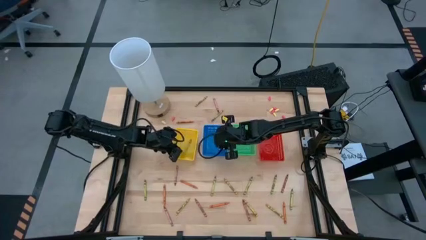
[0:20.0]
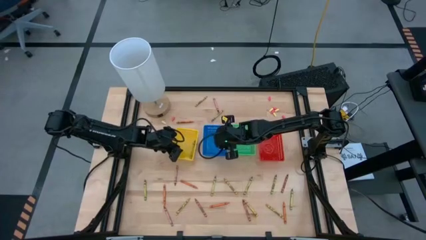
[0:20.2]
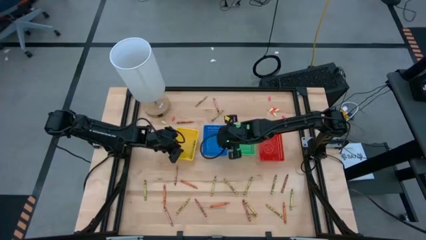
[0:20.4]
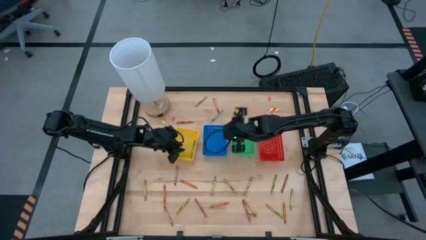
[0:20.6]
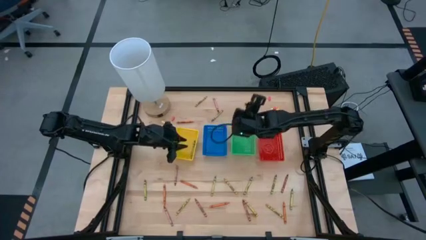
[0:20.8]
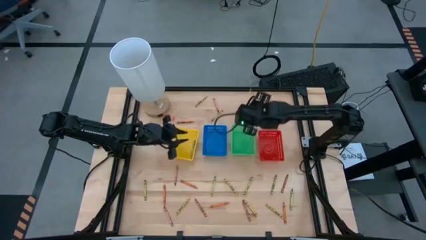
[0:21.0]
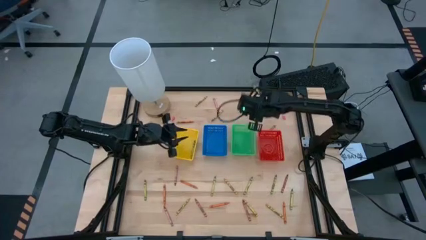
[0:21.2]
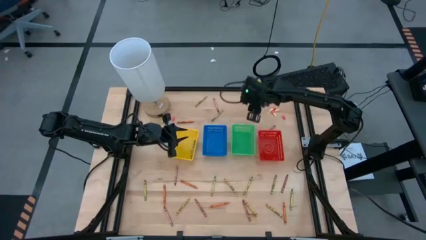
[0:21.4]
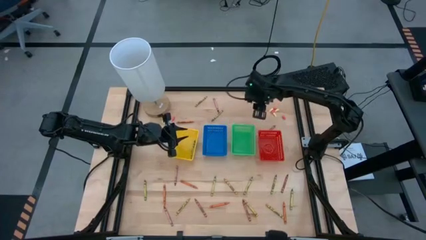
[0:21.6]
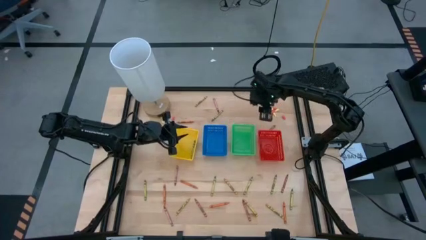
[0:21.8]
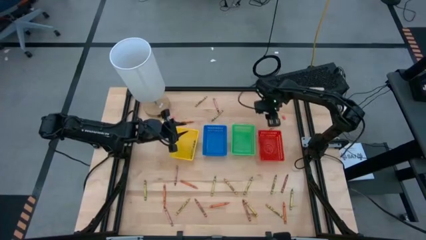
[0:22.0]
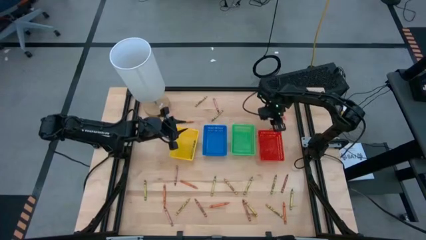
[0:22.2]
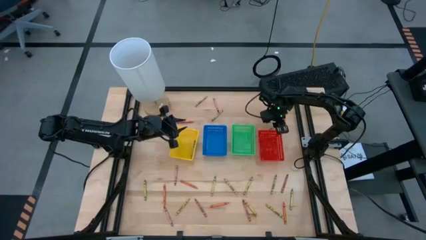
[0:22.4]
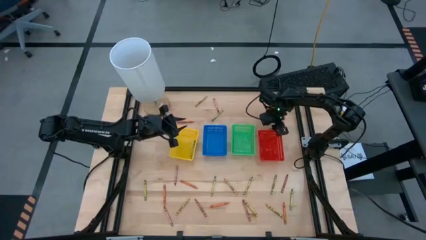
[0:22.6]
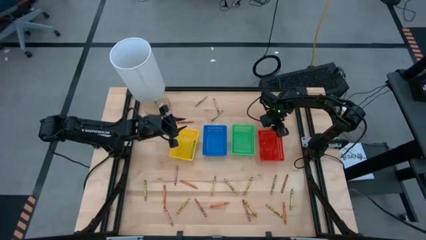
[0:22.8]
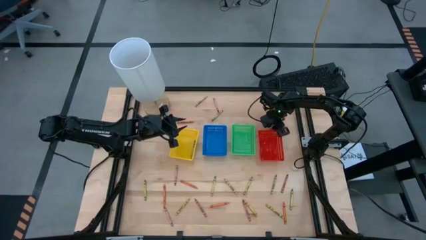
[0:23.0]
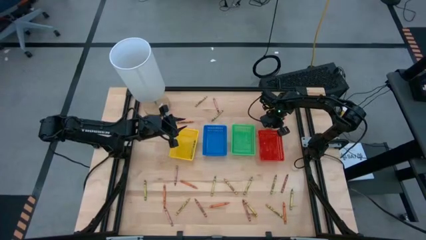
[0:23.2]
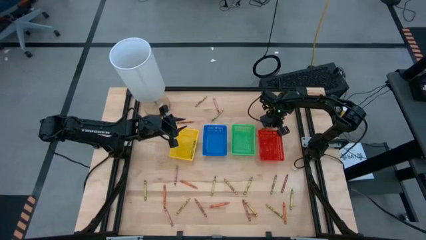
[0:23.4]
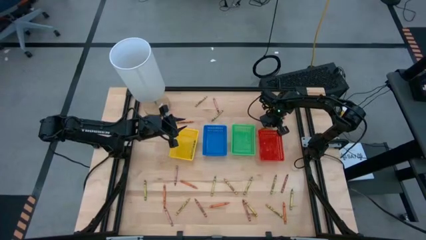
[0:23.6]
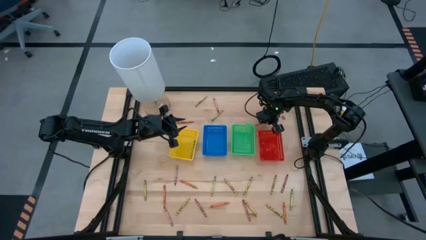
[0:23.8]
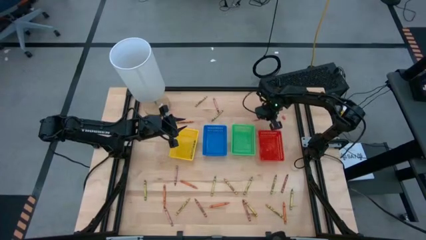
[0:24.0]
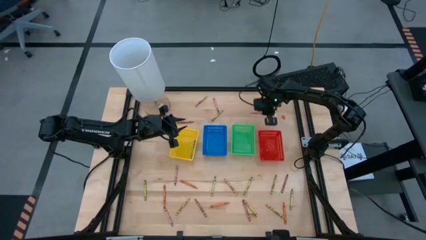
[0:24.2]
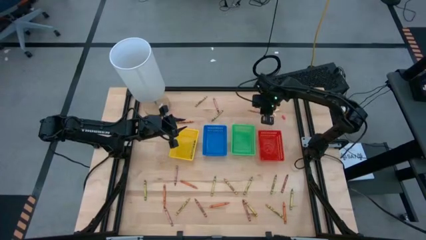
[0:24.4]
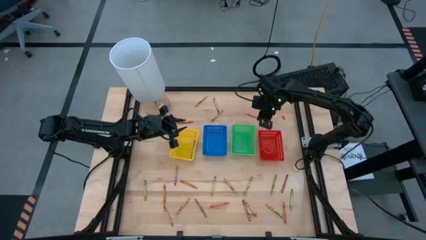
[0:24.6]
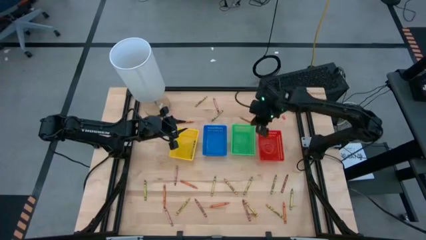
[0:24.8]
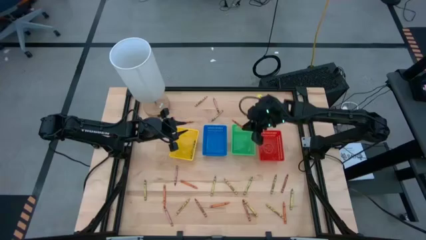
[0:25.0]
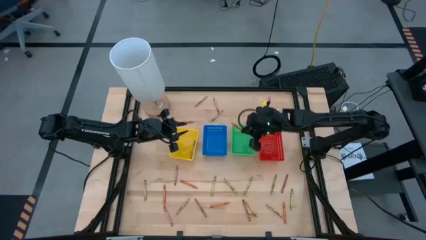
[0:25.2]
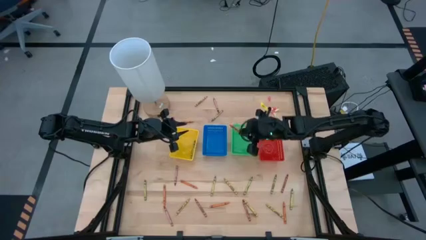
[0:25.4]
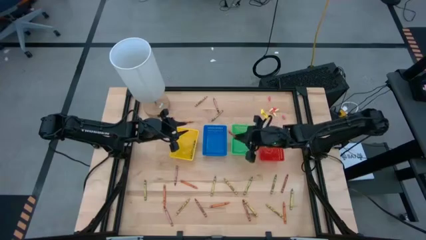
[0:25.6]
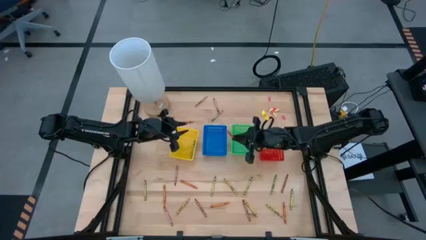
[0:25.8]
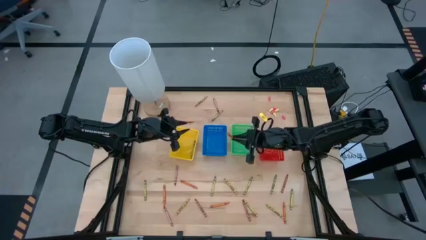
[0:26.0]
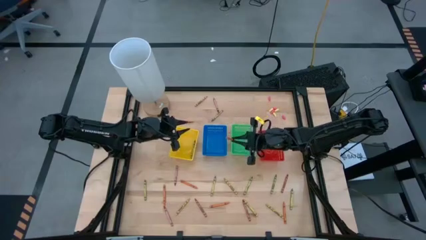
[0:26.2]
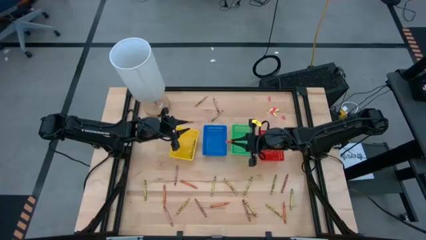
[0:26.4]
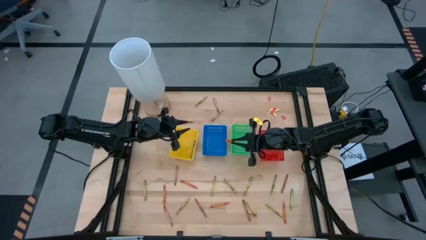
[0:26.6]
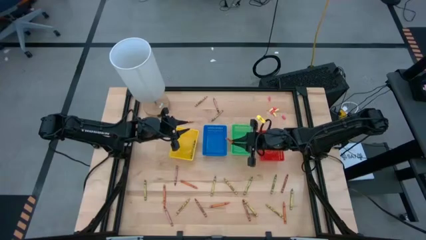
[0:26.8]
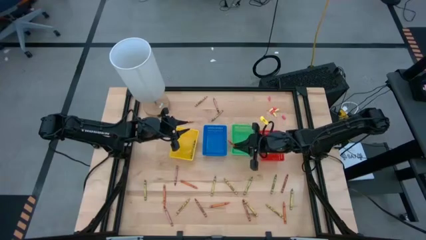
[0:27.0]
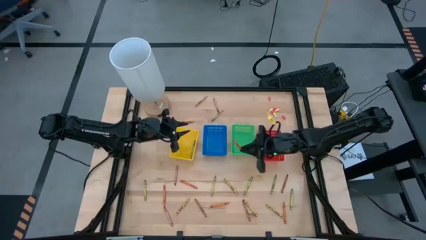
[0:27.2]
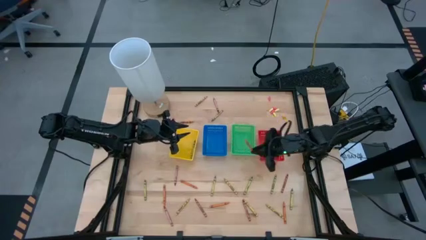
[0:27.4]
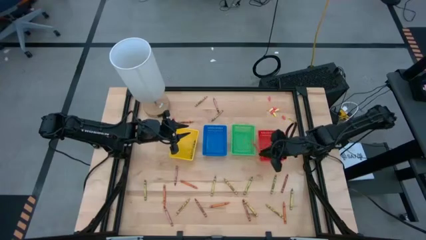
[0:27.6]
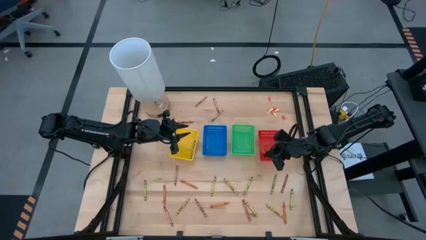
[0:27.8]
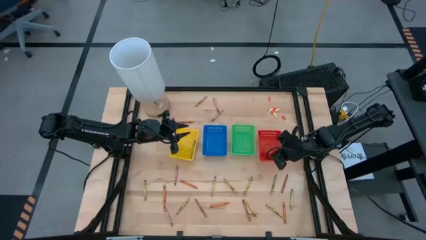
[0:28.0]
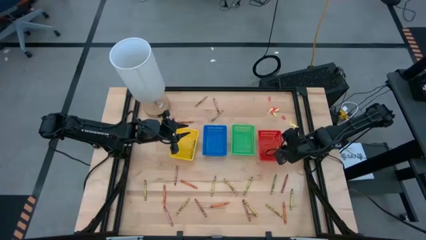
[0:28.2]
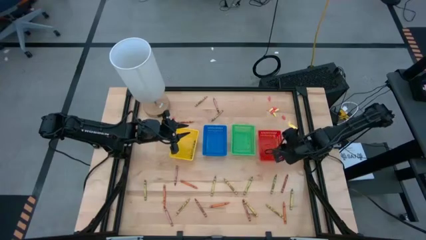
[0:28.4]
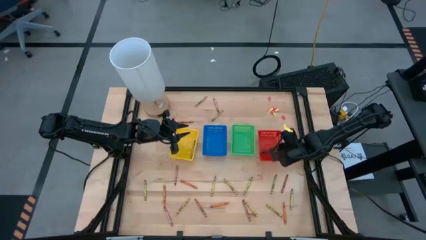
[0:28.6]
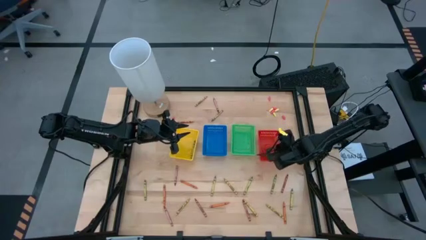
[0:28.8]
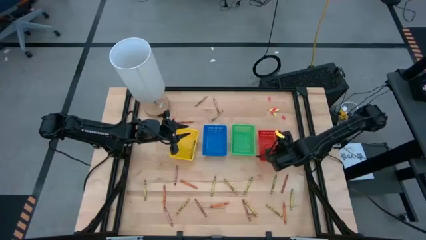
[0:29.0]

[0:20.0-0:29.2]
Task: Sort crayons
Put the orange crayon into the red bin

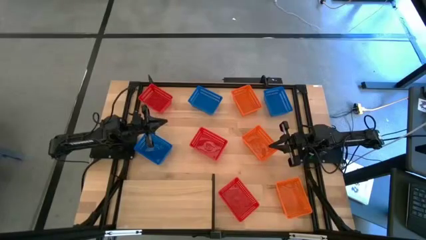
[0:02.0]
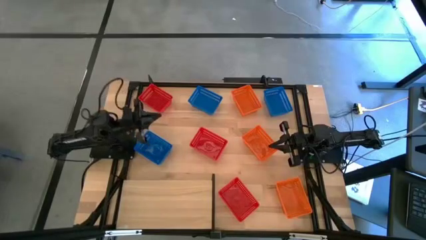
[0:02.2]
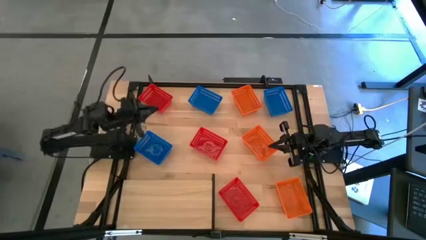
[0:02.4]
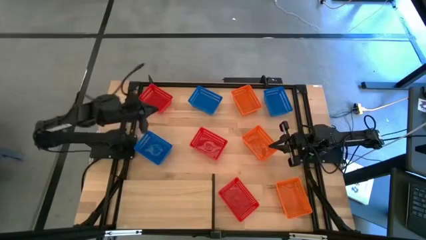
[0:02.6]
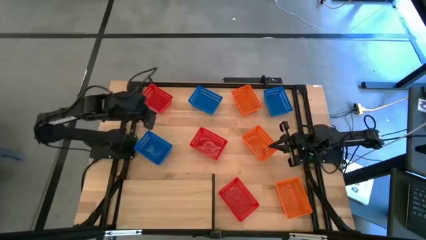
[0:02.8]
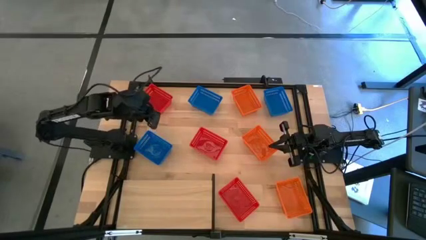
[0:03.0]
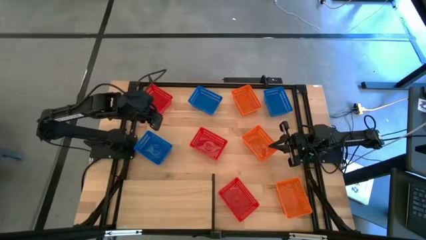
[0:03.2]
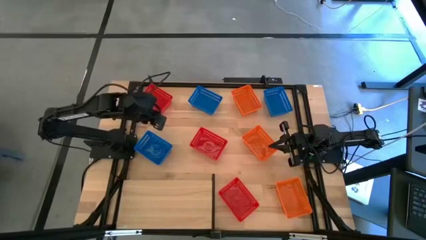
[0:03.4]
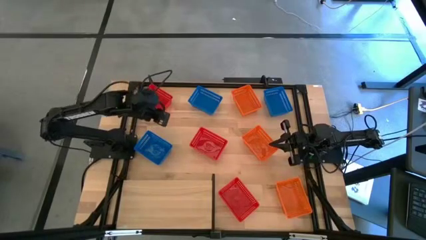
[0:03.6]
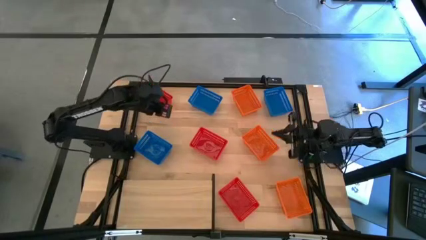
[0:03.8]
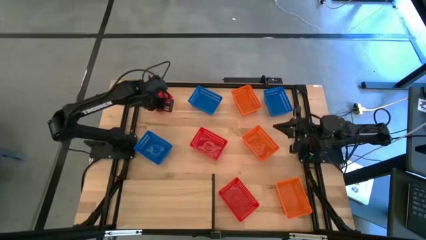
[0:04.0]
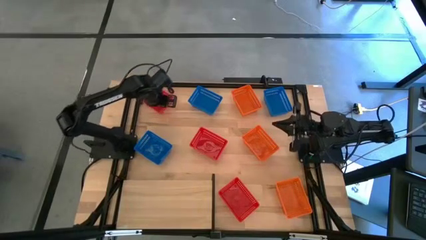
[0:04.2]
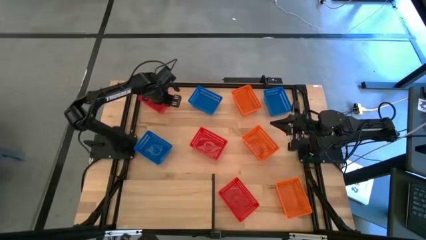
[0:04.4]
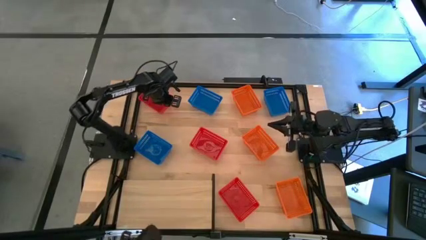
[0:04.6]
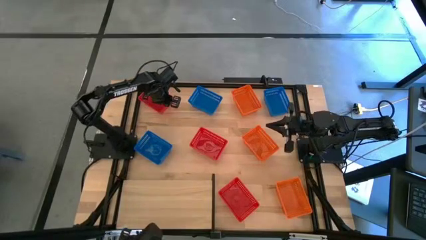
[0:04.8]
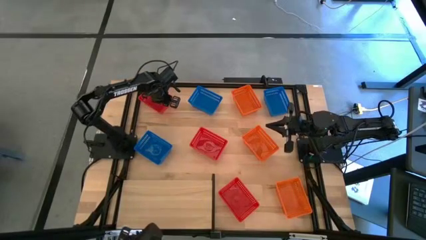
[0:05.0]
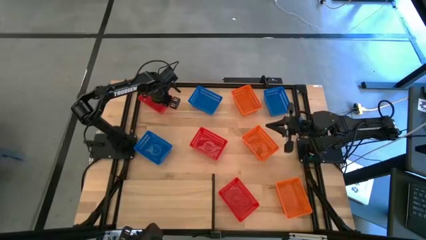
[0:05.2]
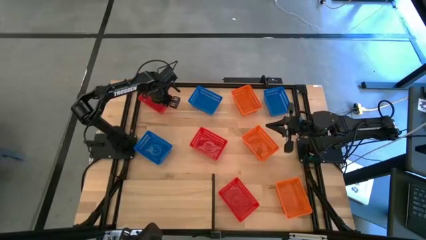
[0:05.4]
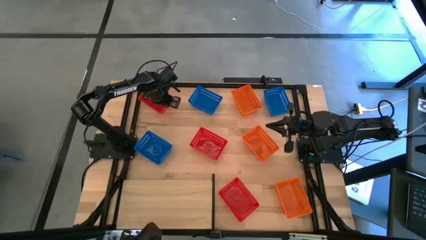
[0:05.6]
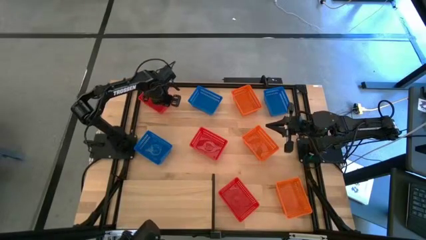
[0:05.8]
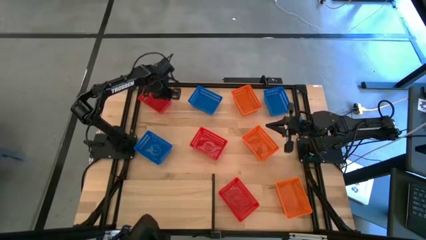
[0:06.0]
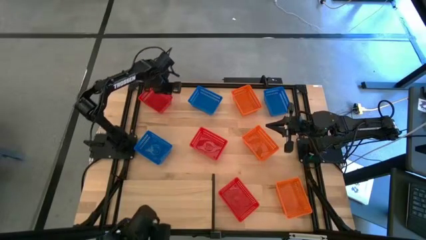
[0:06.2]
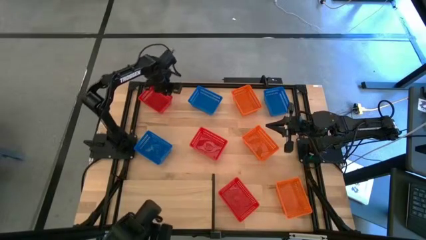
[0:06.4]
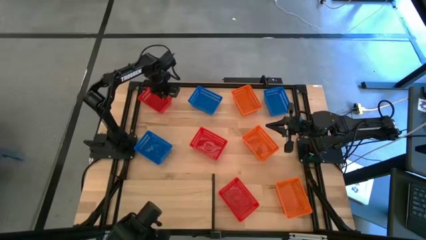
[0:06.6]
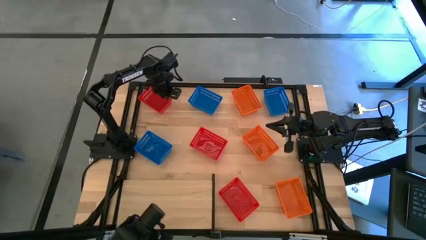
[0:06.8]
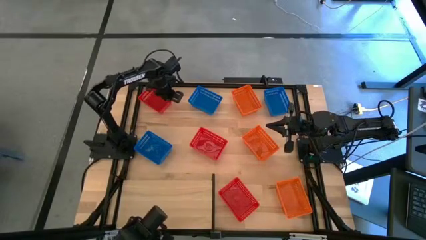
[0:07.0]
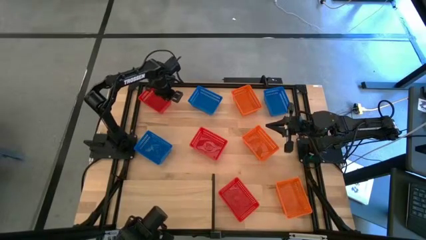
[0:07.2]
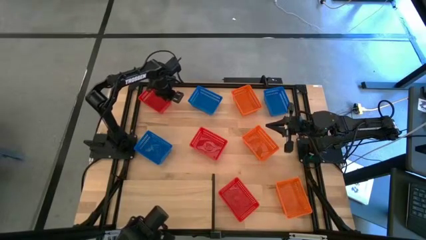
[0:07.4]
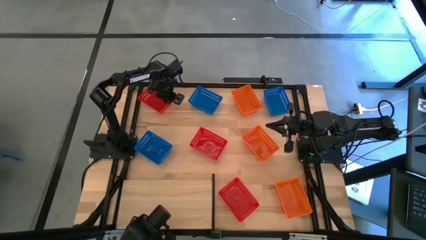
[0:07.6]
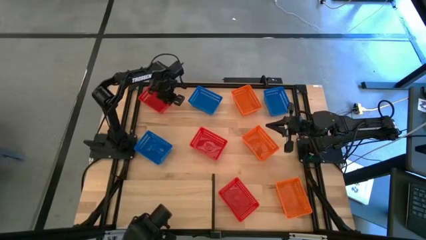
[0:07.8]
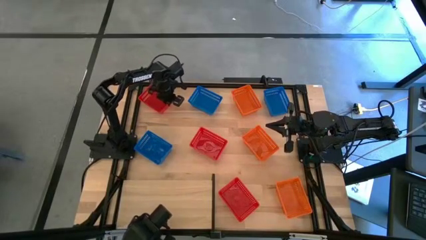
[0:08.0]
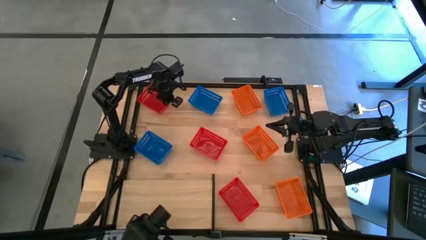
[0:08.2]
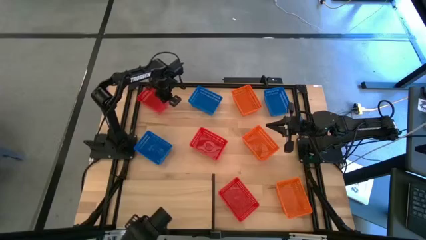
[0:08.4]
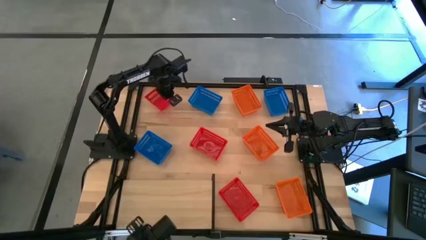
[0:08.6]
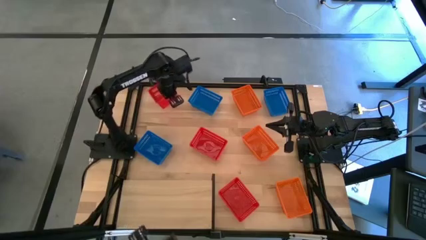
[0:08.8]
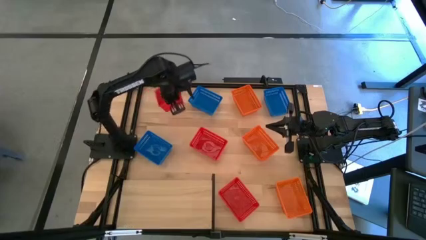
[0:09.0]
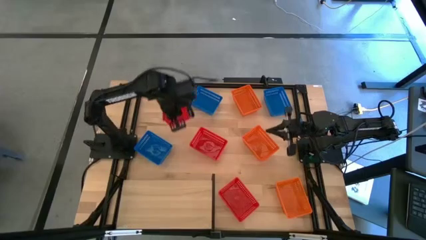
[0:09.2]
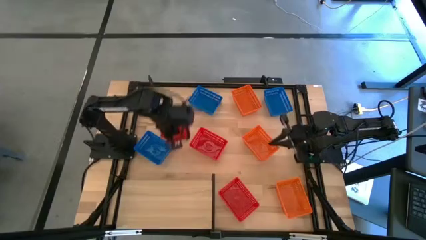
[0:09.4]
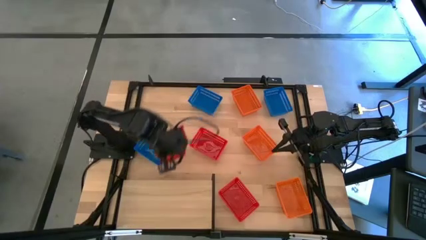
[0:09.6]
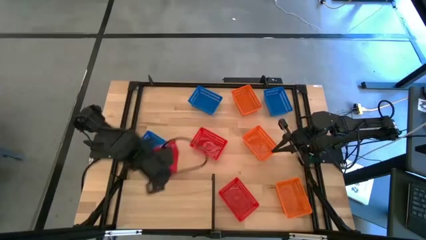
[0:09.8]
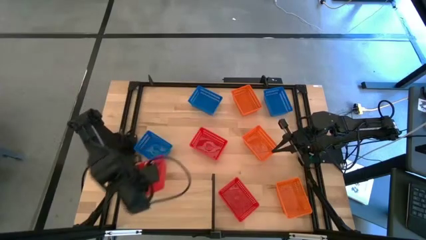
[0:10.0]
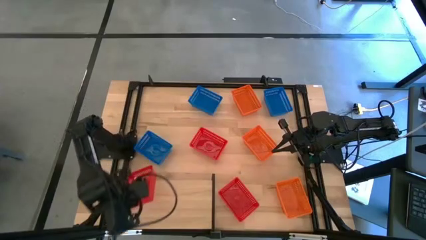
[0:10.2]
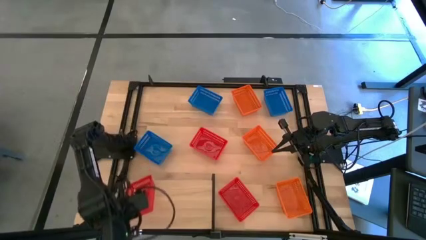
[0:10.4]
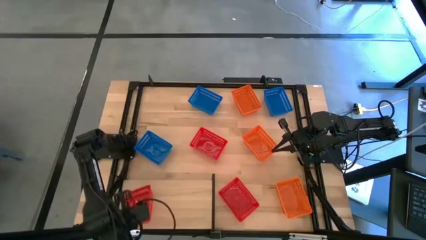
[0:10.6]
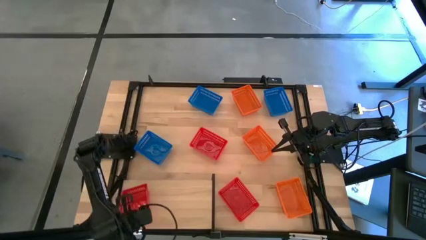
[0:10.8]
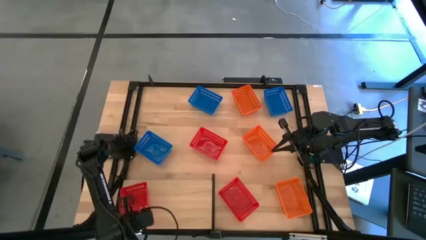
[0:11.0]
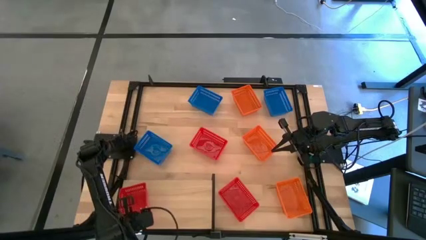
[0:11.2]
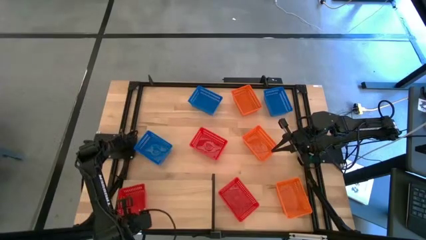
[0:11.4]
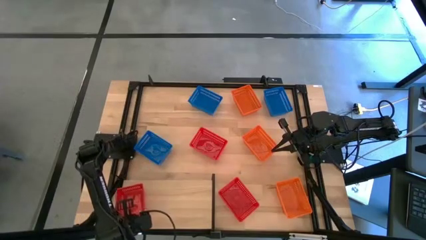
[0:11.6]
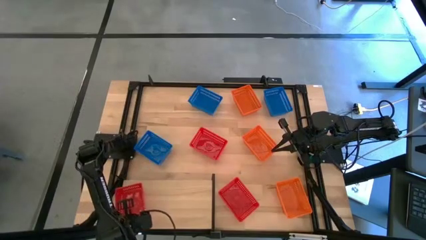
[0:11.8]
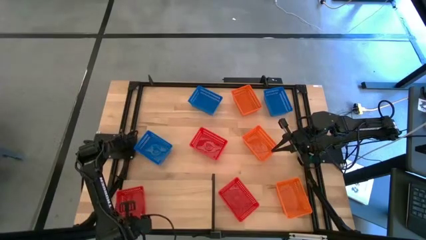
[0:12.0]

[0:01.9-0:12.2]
Task: Stack baskets on shelf by color
Put the top red bin on the shelf
